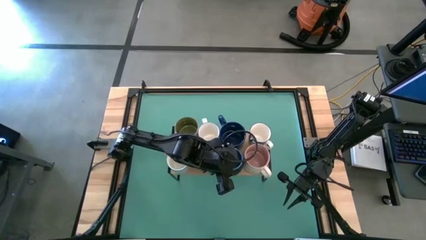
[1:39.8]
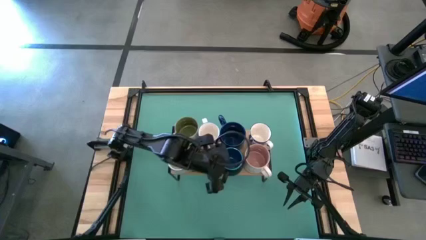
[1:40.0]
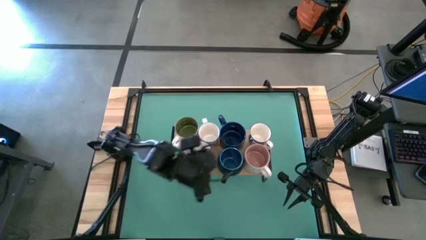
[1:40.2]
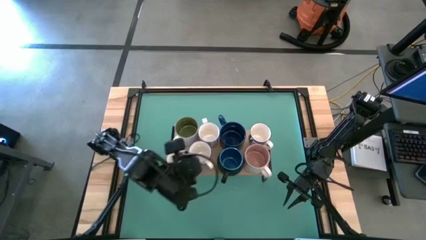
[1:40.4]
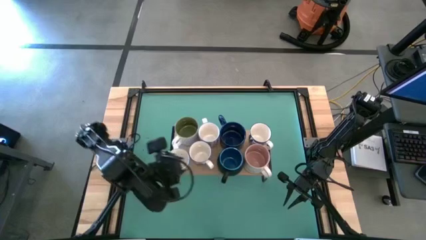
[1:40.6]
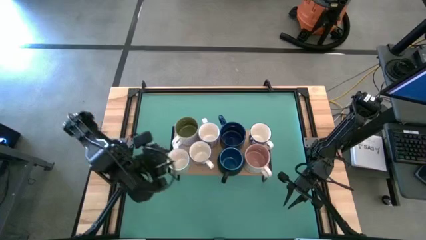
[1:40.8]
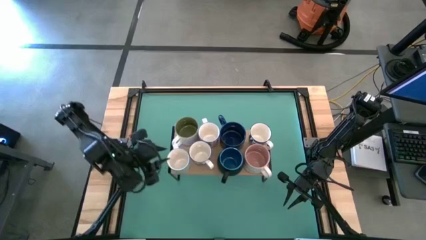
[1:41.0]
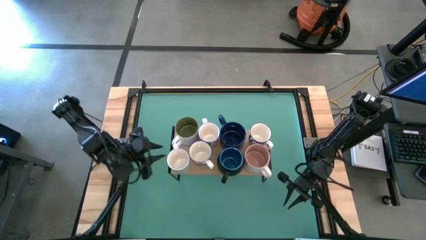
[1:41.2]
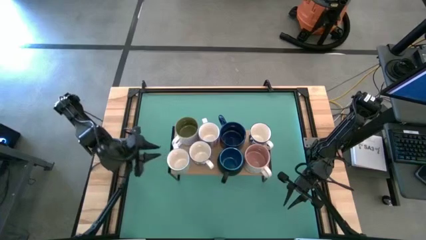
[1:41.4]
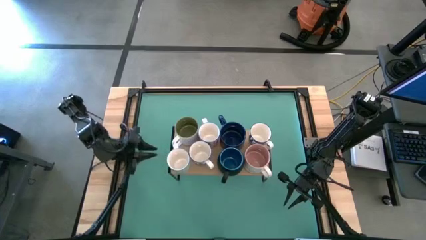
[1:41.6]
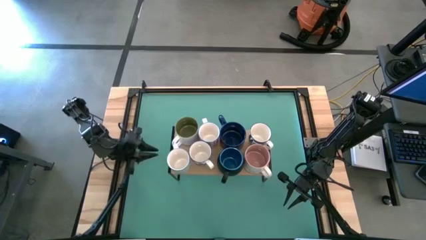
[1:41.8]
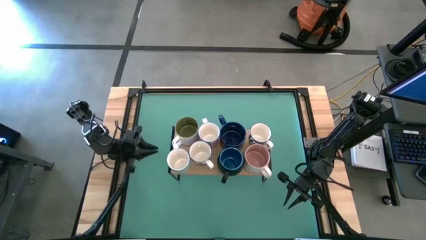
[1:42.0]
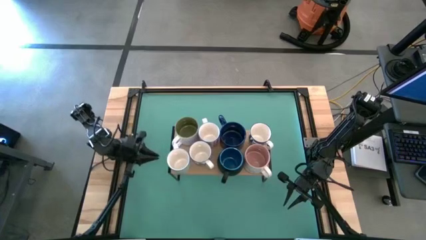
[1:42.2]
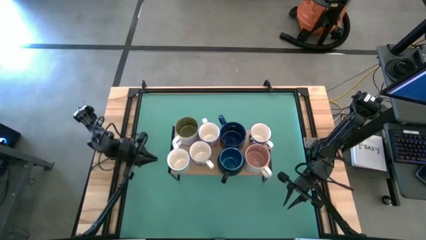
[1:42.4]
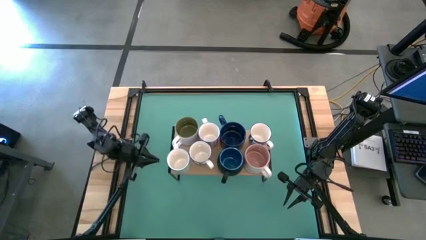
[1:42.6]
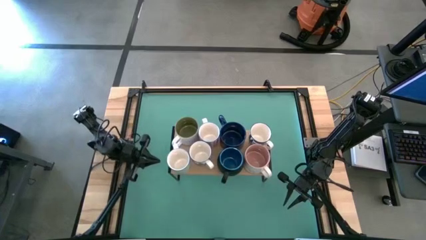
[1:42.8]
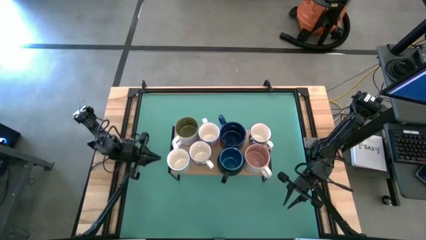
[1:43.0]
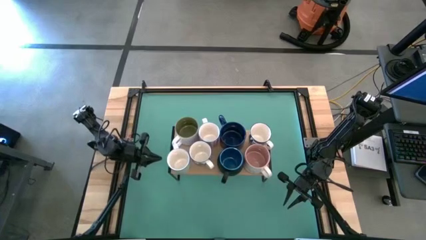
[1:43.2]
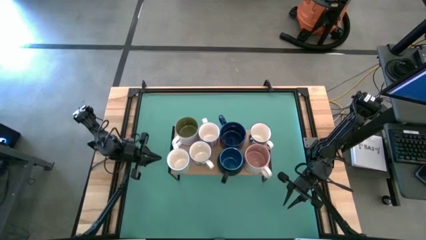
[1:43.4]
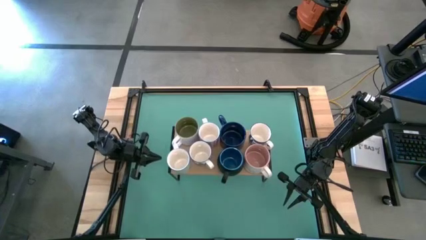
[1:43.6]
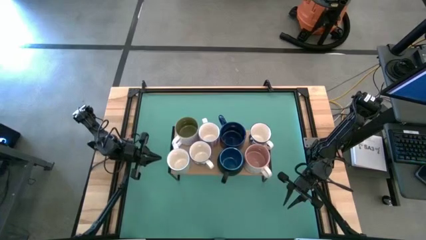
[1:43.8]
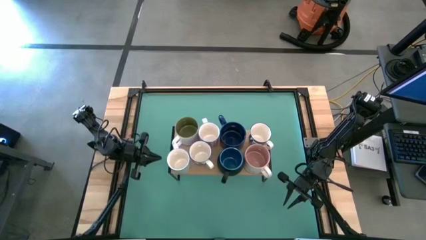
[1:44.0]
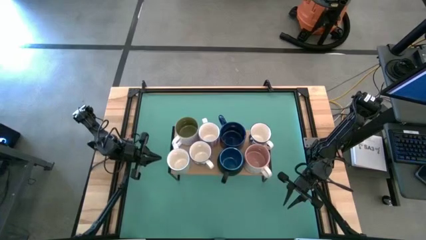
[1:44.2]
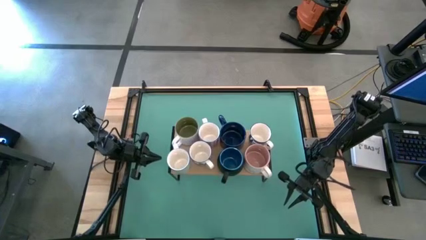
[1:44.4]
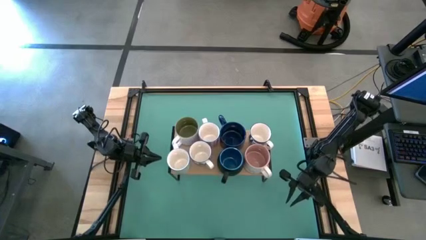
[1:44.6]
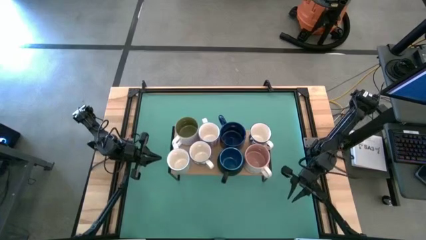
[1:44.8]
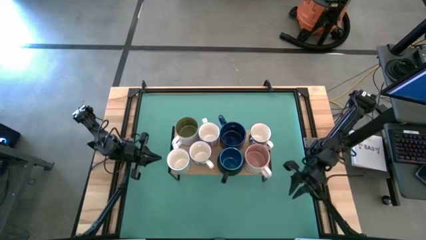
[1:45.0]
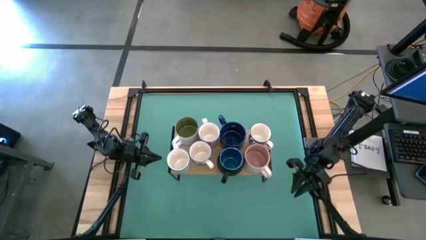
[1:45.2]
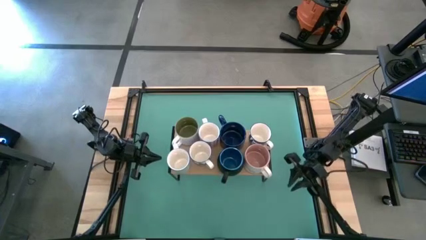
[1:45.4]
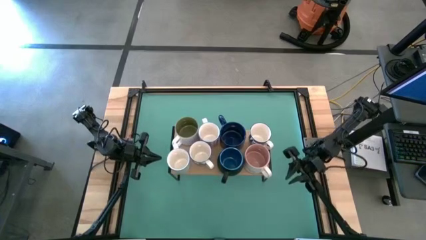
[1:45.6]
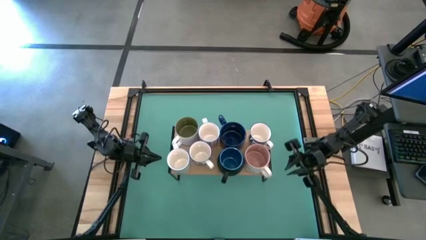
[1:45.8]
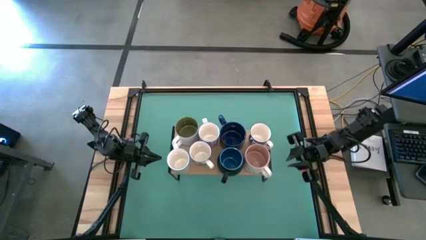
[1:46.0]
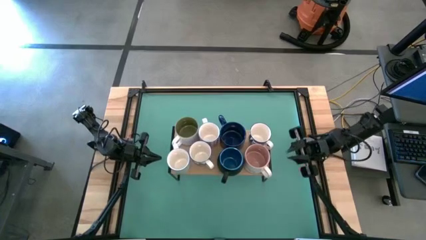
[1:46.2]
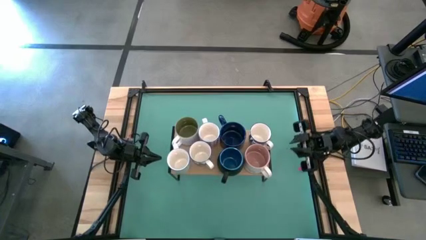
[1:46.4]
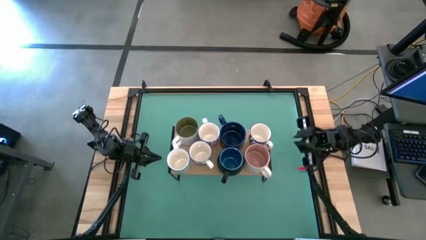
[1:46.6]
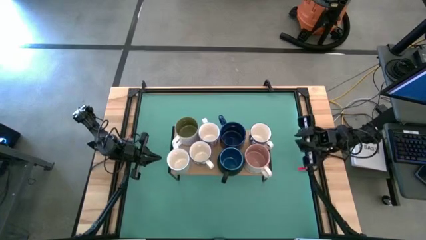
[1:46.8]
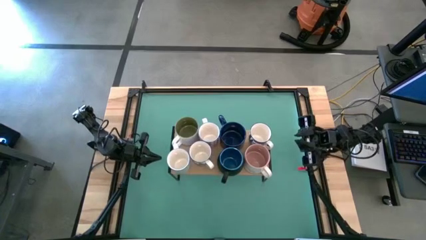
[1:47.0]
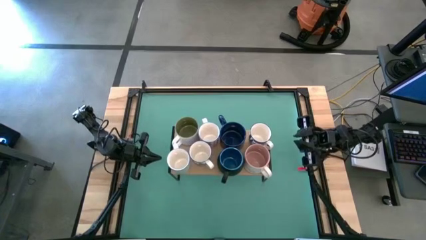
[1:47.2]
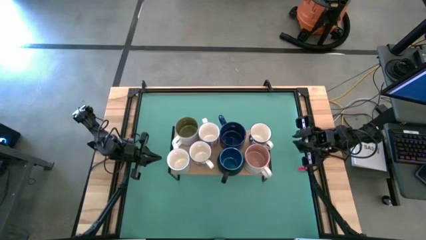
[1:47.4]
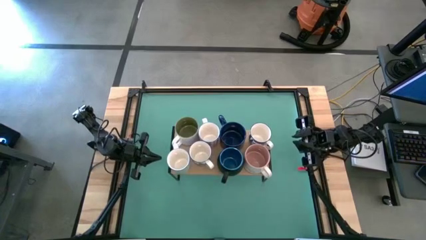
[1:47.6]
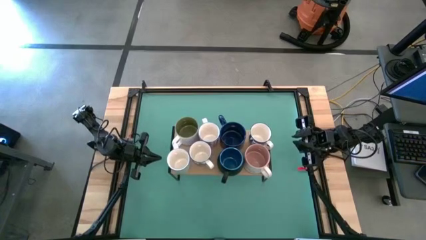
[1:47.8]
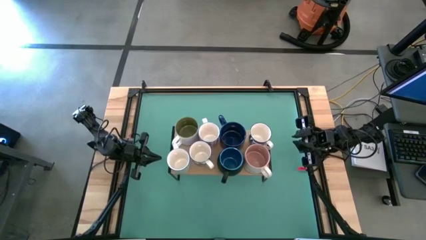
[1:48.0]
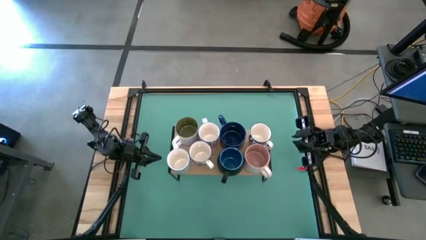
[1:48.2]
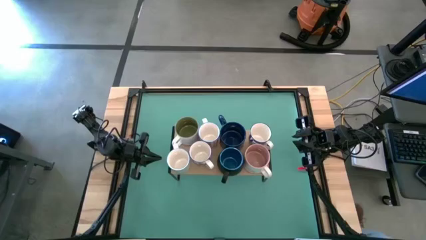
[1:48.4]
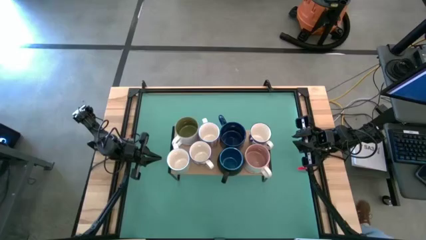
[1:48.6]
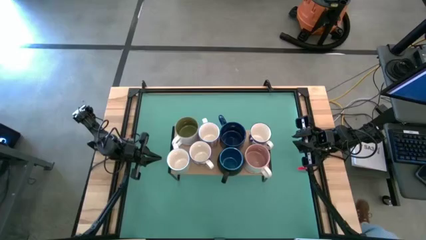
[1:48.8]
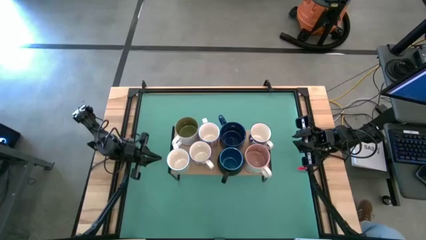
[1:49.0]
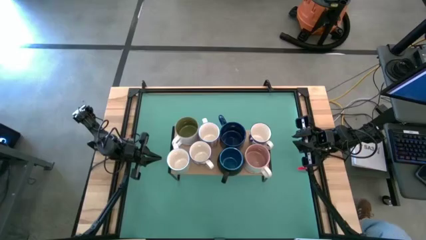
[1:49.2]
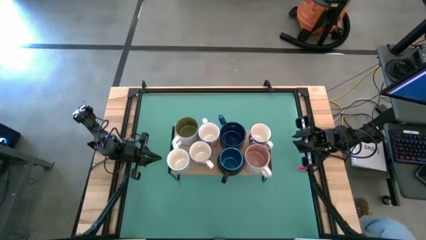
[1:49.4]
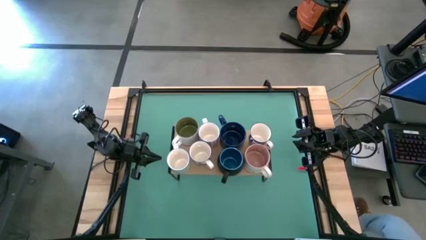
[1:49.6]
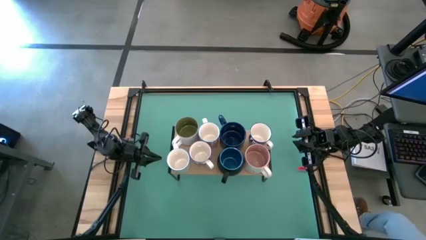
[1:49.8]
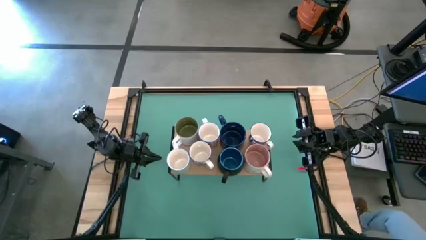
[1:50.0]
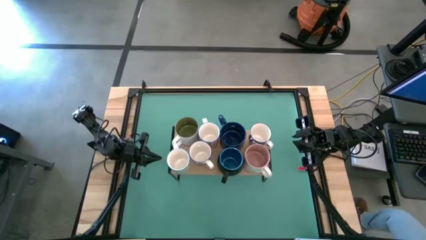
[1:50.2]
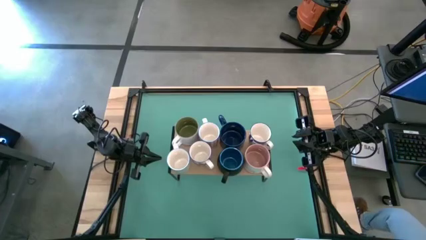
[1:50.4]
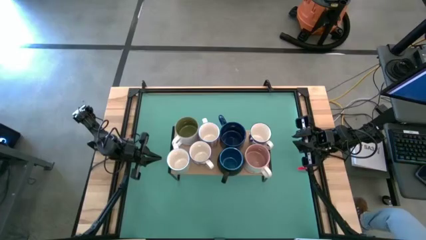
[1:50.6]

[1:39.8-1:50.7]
Task: Place coffee mugs
Return to Home Position
